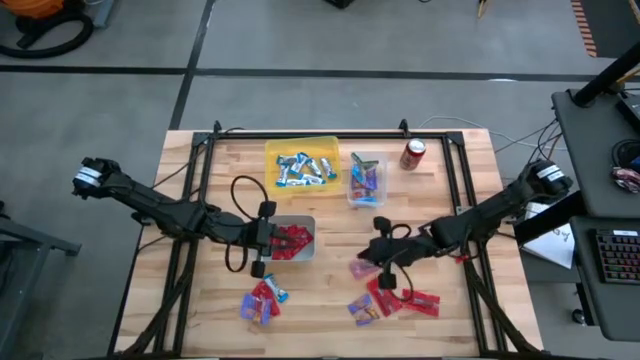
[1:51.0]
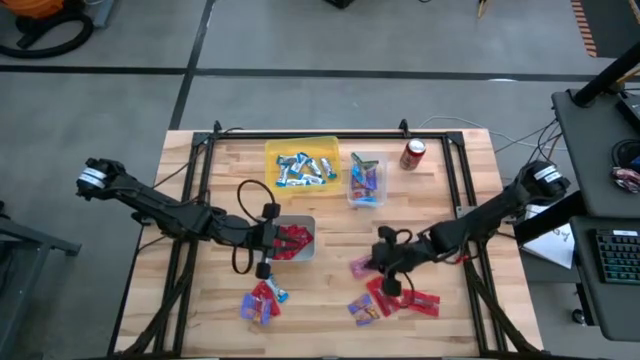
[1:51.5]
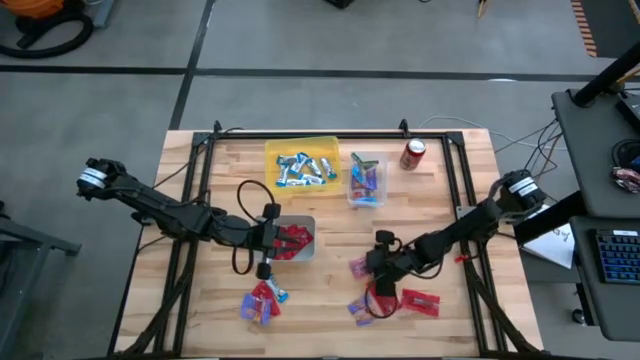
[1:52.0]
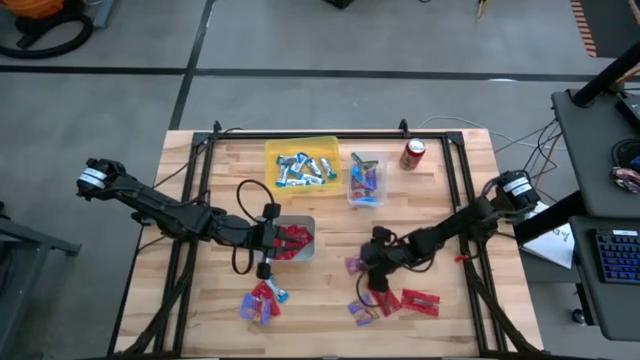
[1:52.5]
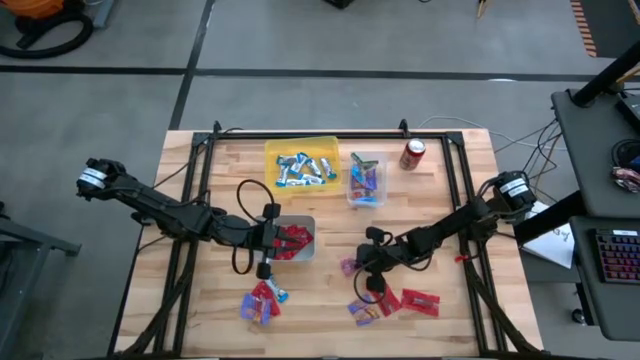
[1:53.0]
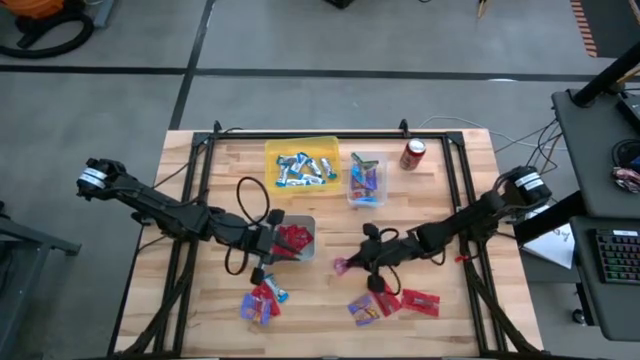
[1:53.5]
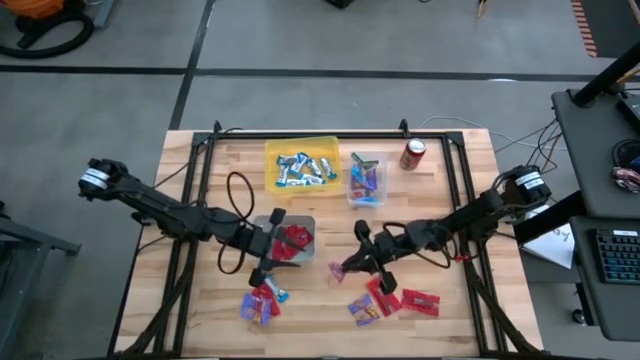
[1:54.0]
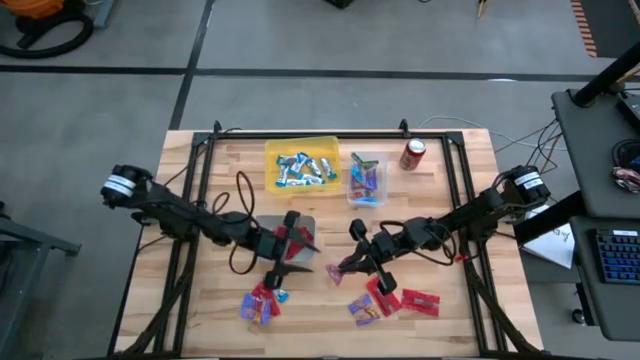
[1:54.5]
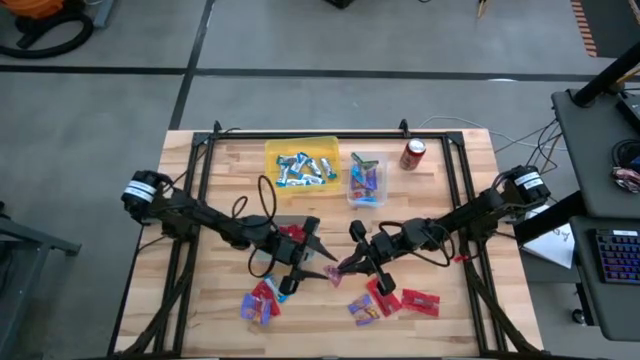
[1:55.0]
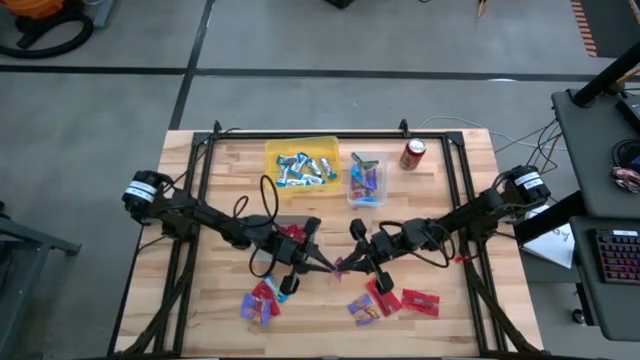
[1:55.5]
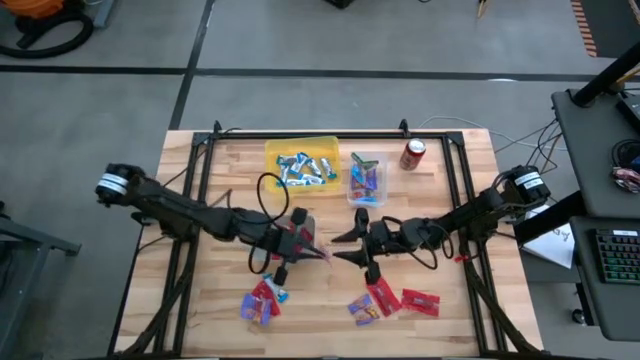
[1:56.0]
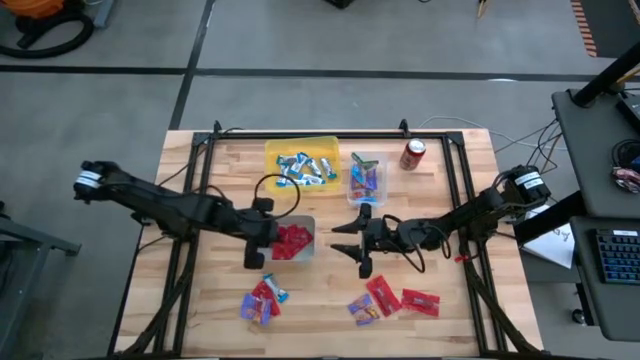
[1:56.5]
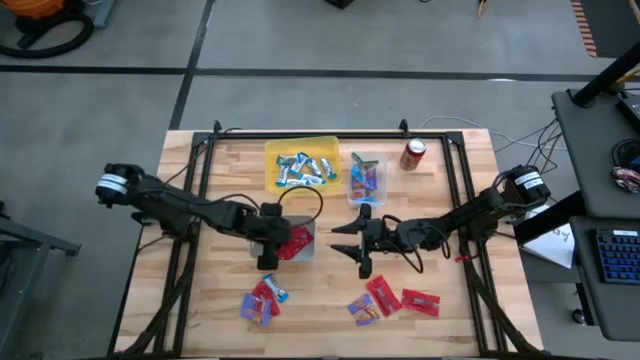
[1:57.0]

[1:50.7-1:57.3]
Task: Sort candy
Put the red candy into the gray bin

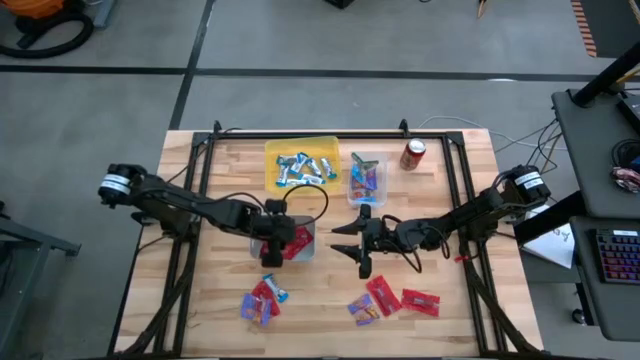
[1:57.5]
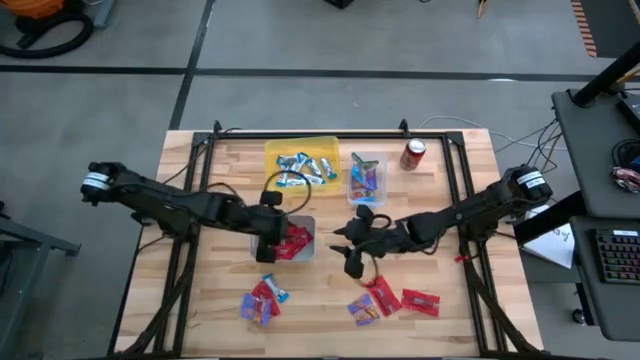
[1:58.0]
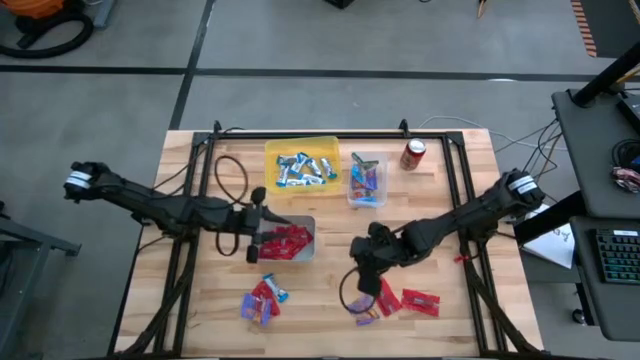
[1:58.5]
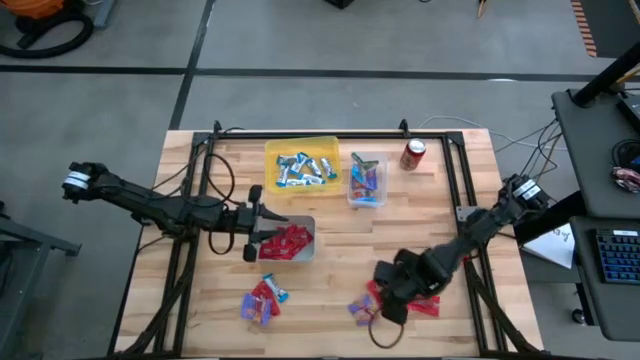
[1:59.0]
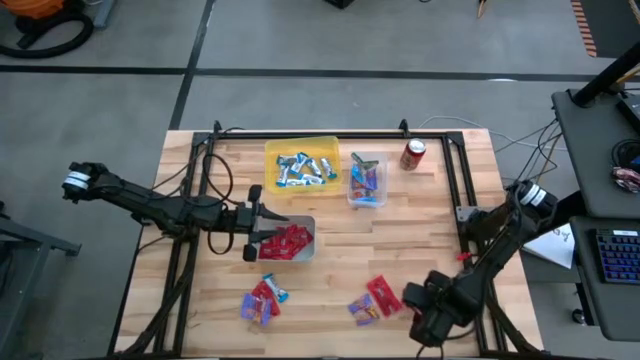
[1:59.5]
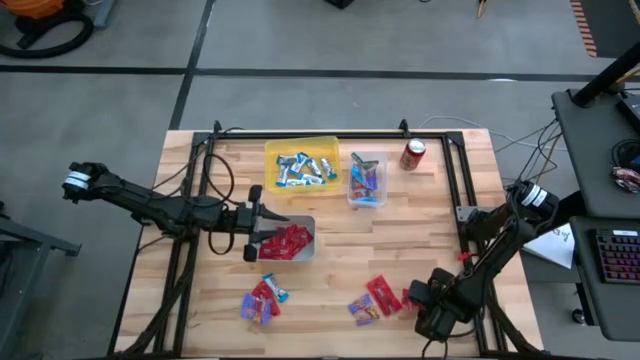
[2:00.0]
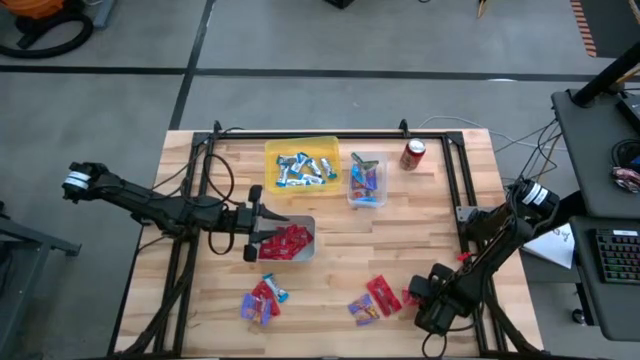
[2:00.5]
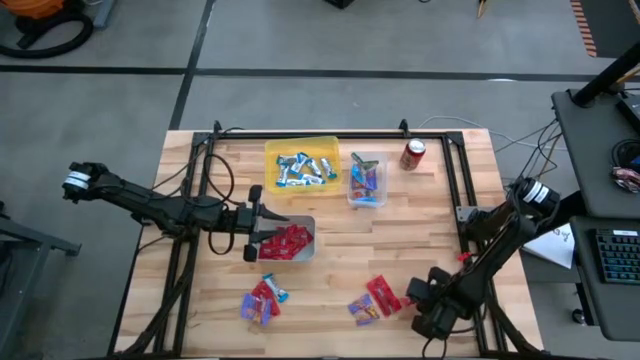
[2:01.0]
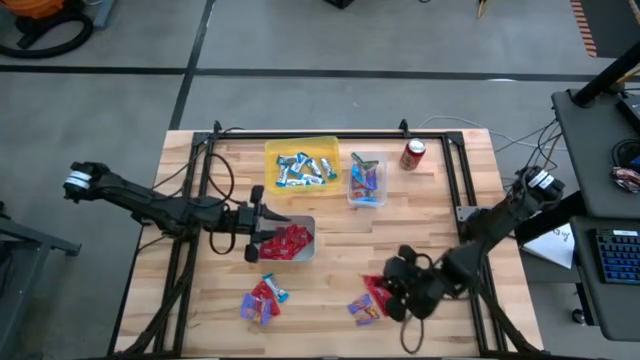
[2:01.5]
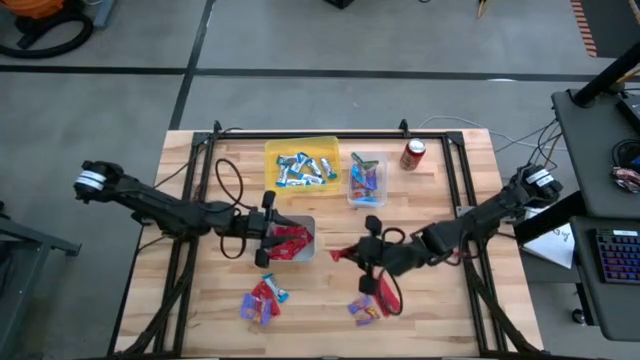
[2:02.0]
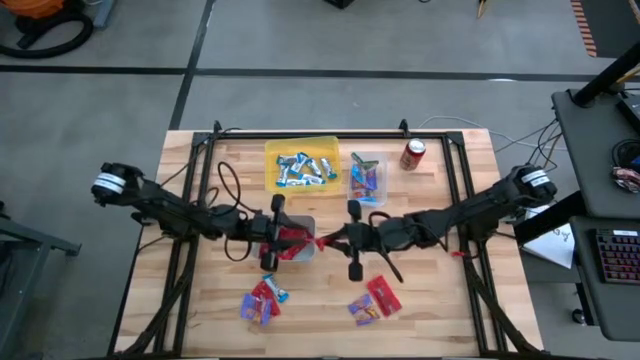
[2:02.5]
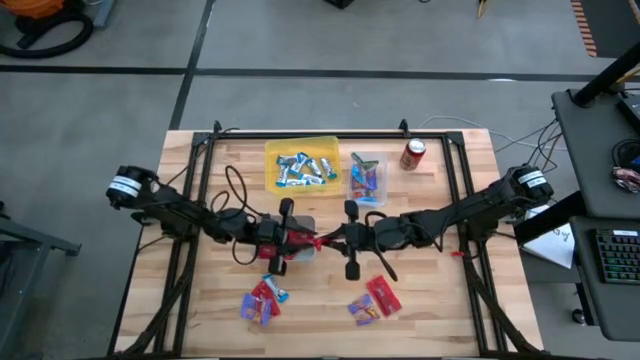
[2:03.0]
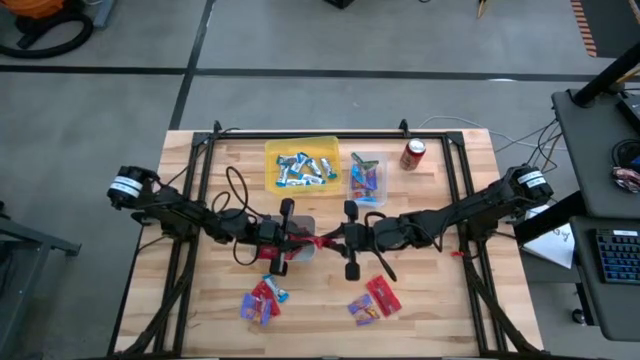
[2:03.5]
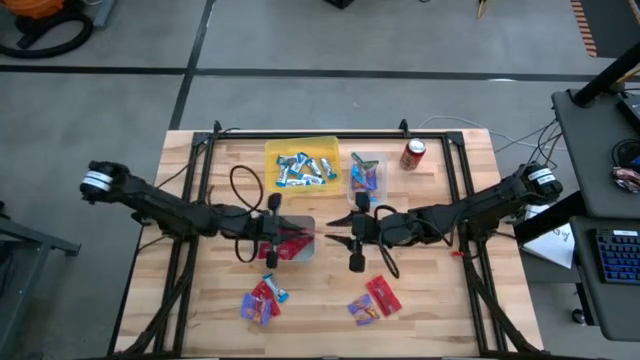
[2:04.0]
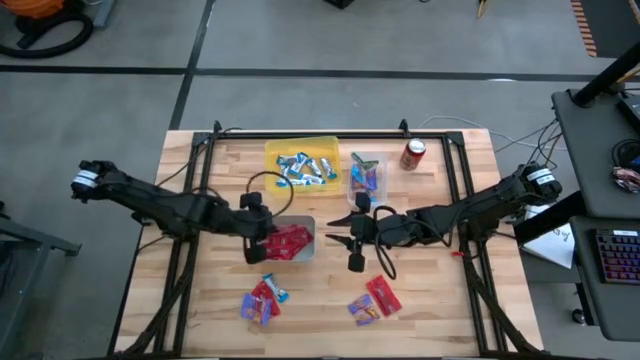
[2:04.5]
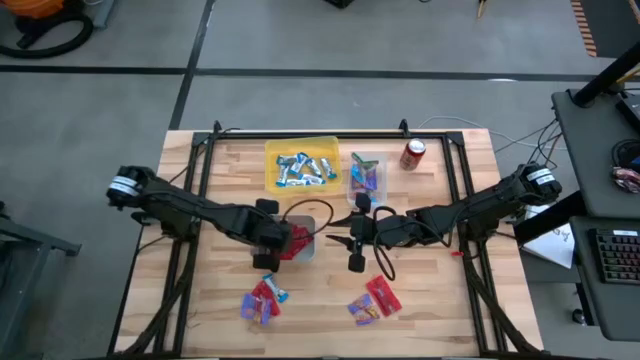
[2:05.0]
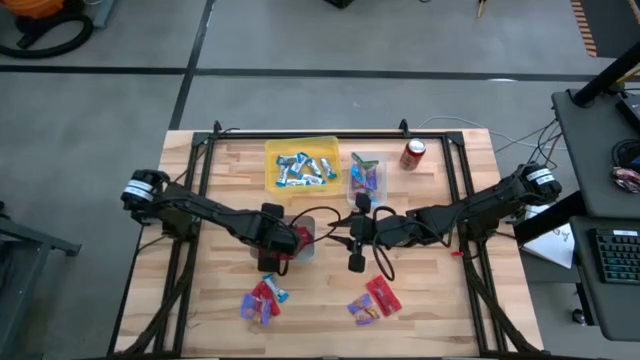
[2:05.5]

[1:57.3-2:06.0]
Put the red candy into the gray bin

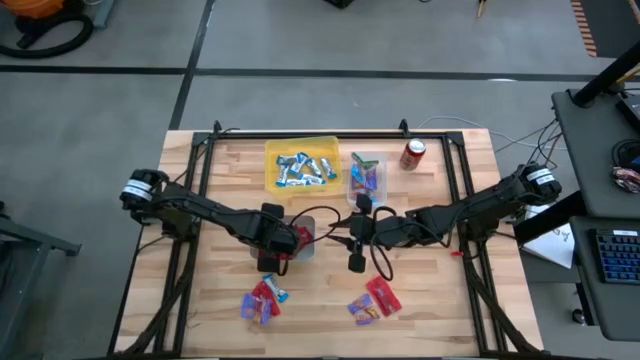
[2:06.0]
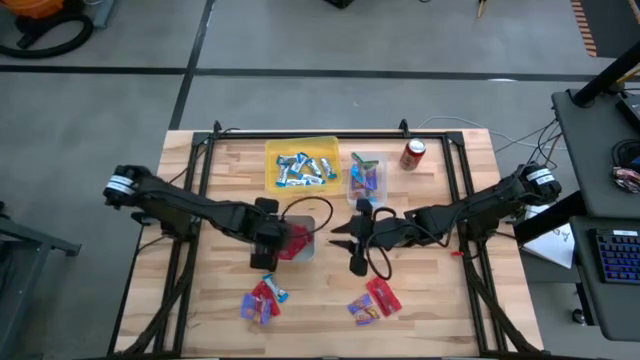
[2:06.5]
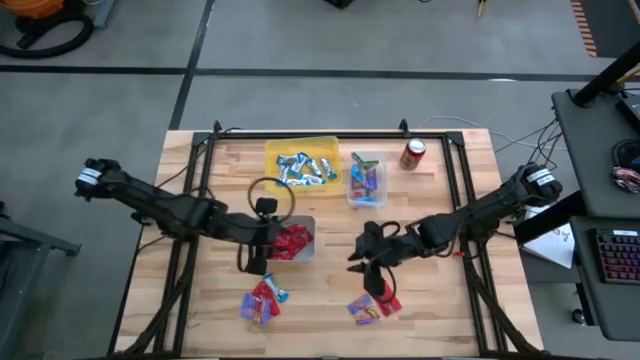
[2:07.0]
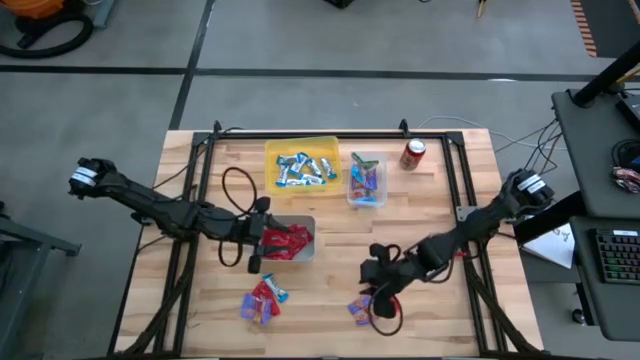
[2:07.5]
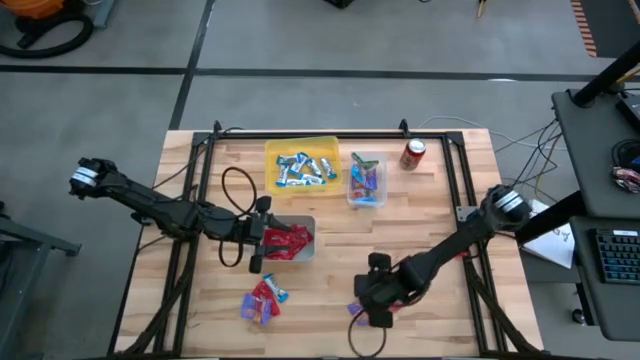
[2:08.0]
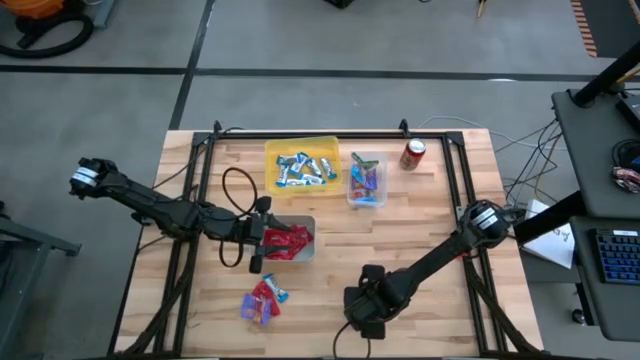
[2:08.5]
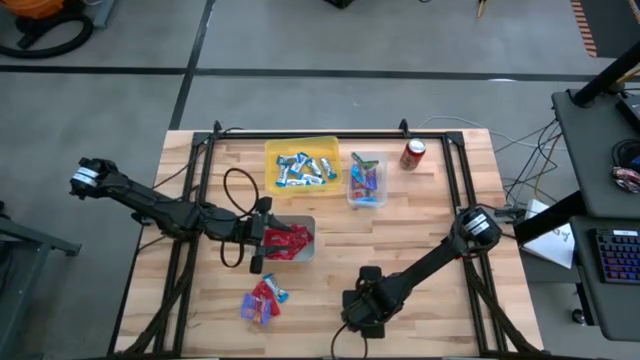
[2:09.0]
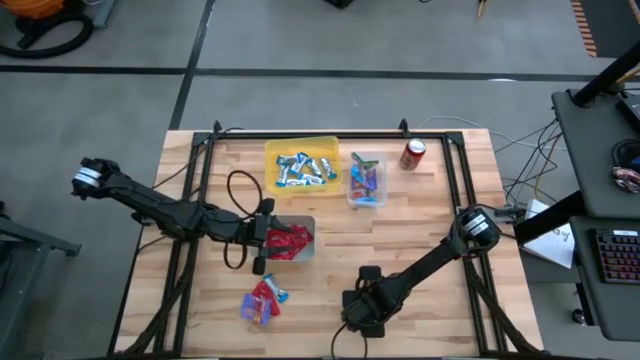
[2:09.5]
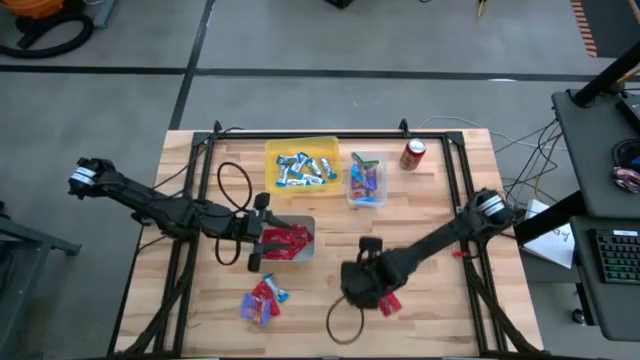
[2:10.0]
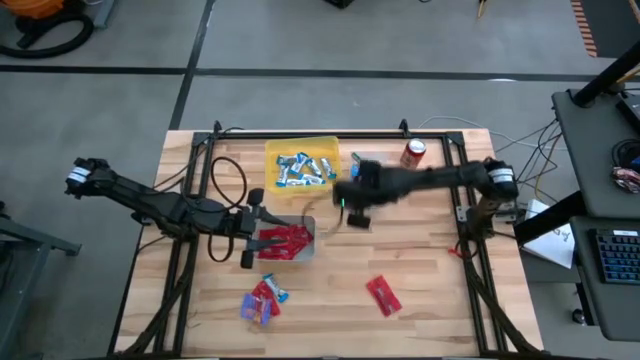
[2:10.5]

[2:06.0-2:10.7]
Put the blue candy into the transparent bin
